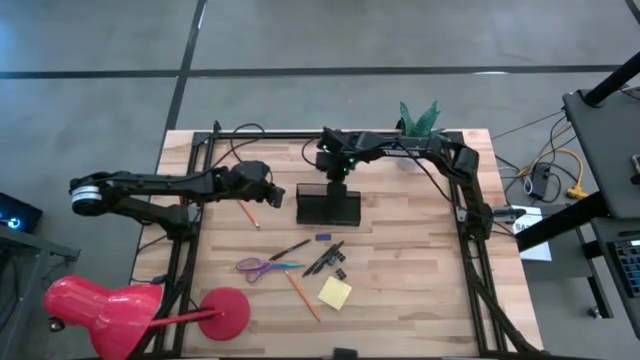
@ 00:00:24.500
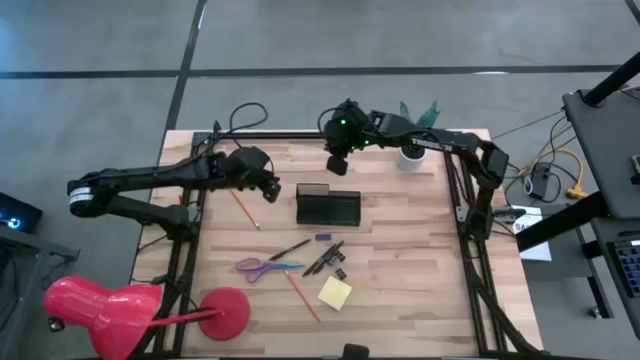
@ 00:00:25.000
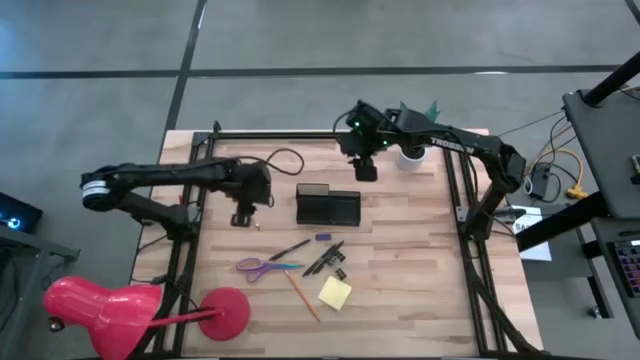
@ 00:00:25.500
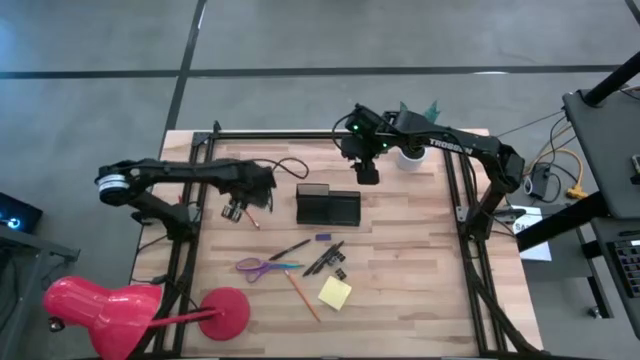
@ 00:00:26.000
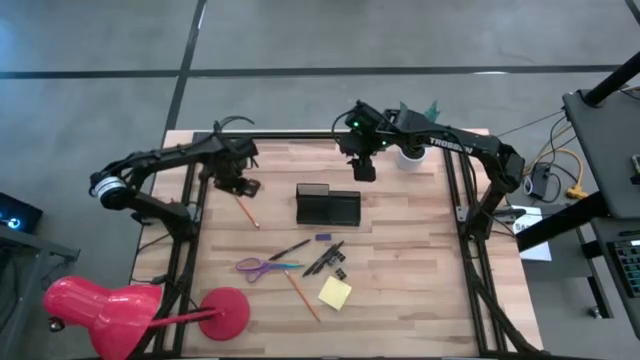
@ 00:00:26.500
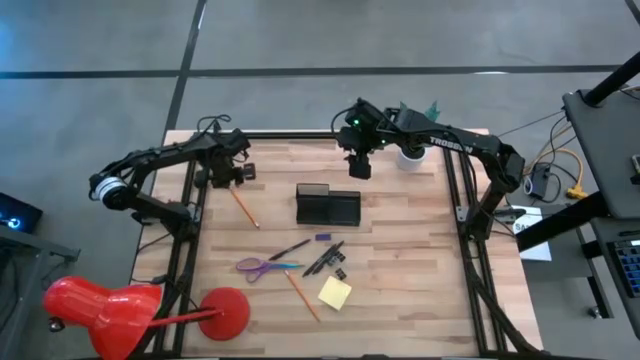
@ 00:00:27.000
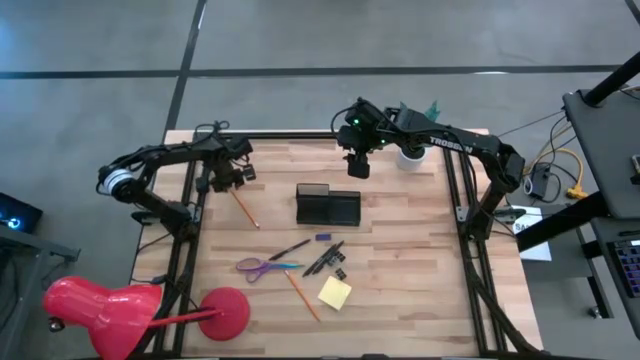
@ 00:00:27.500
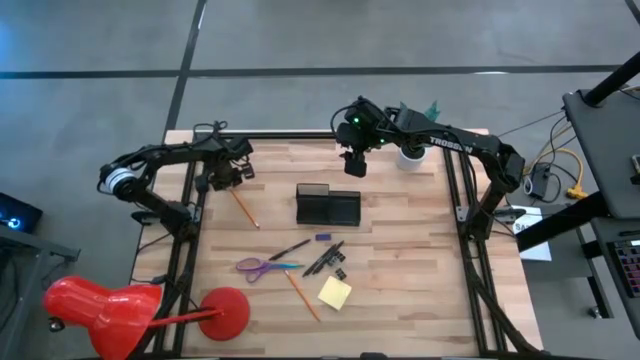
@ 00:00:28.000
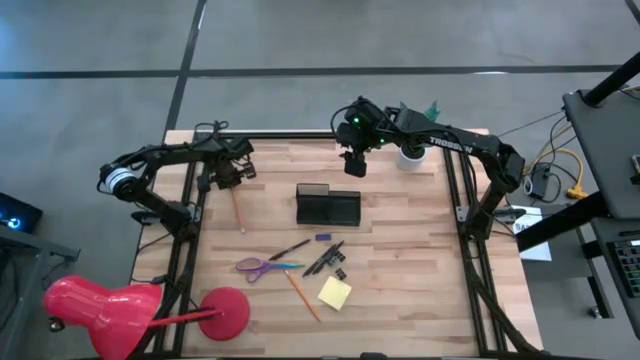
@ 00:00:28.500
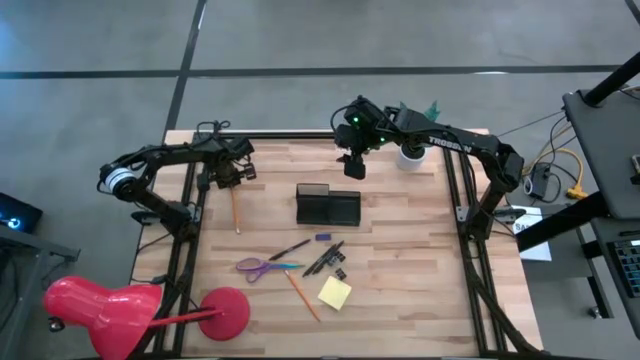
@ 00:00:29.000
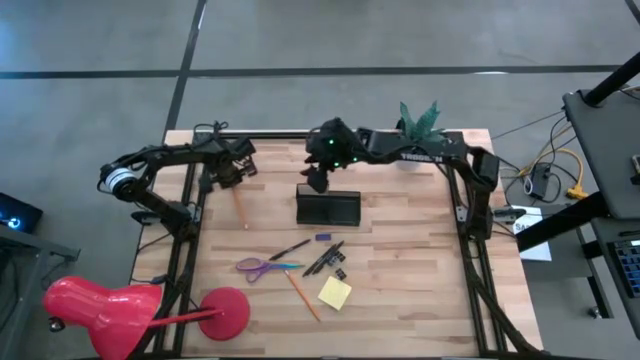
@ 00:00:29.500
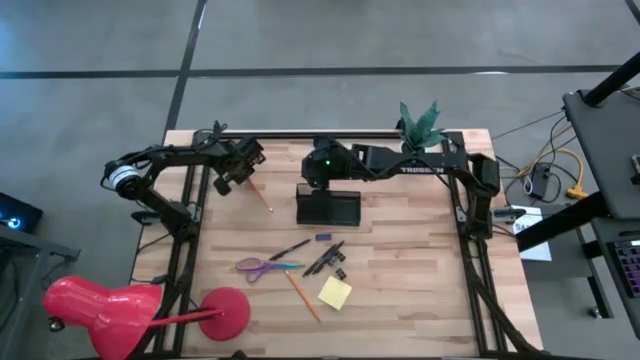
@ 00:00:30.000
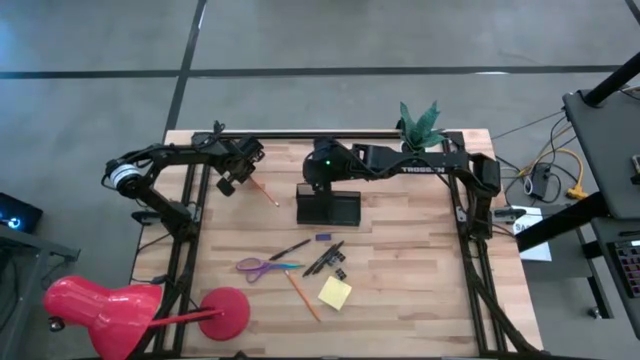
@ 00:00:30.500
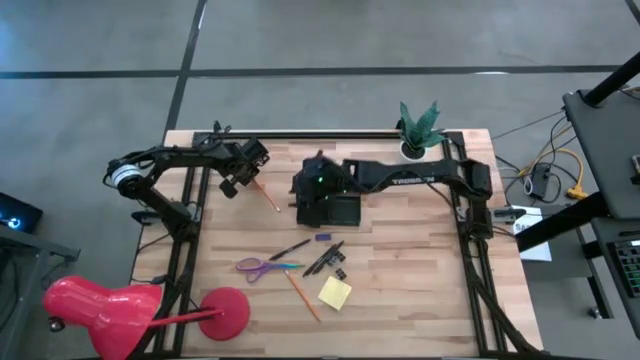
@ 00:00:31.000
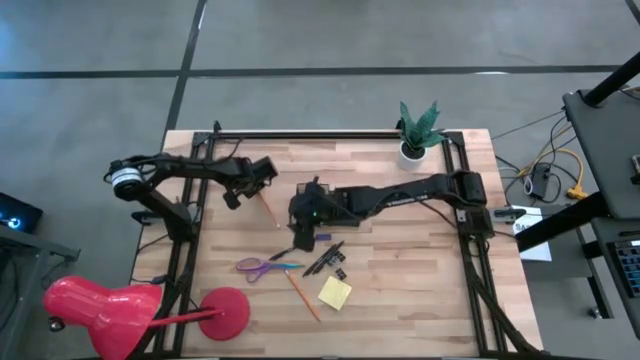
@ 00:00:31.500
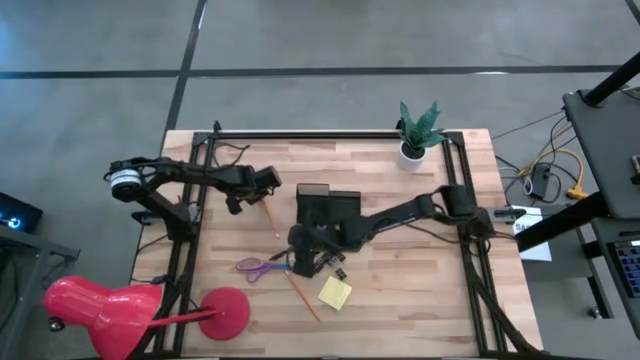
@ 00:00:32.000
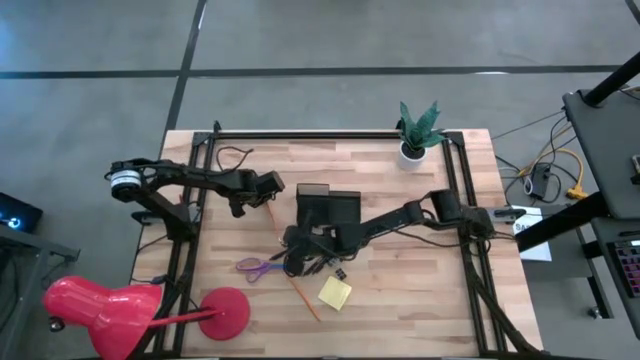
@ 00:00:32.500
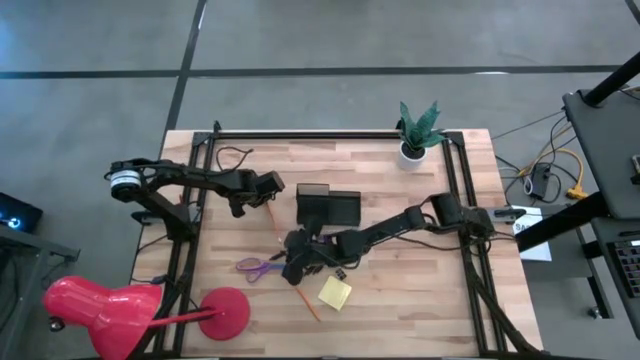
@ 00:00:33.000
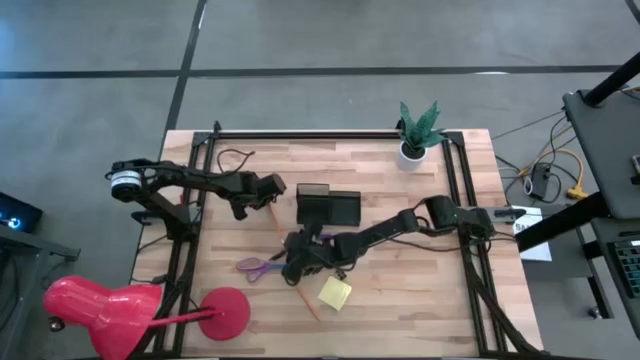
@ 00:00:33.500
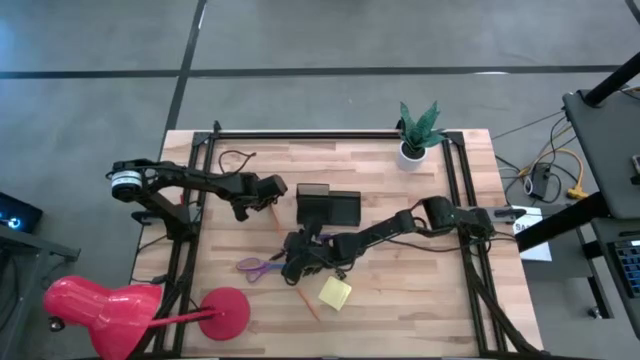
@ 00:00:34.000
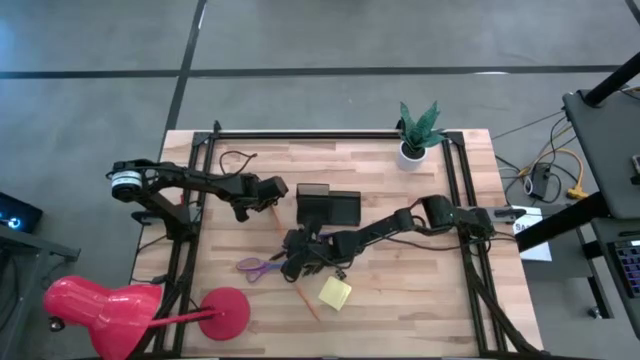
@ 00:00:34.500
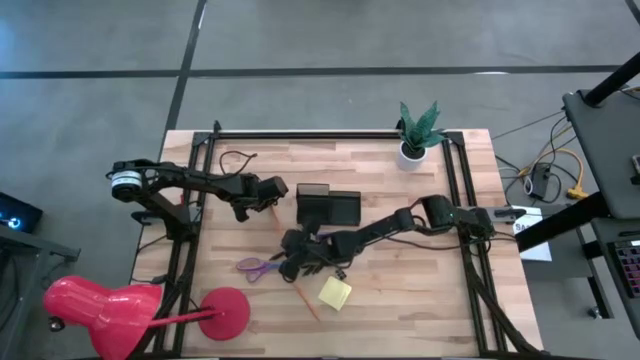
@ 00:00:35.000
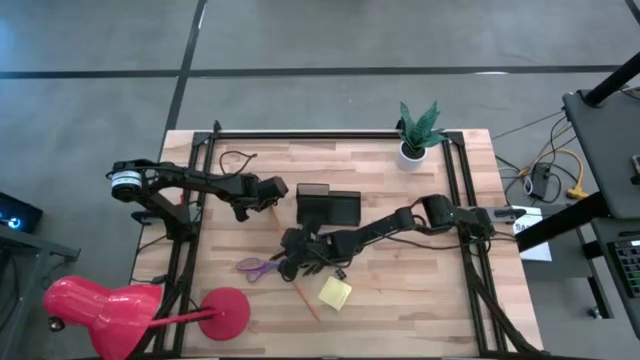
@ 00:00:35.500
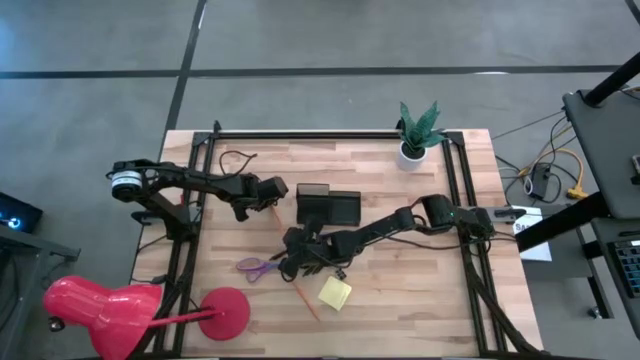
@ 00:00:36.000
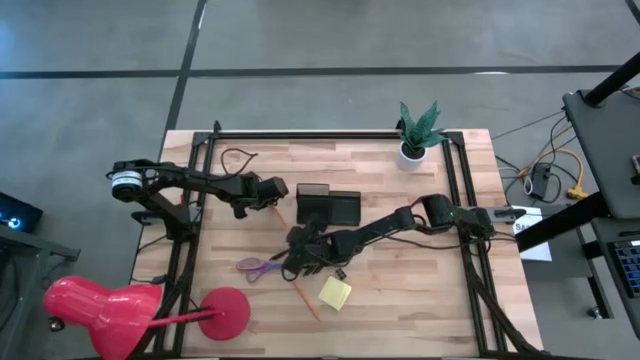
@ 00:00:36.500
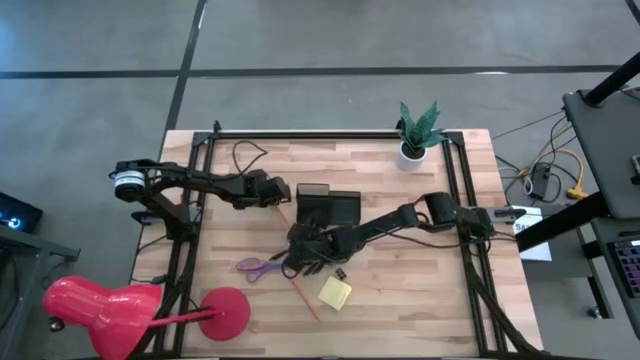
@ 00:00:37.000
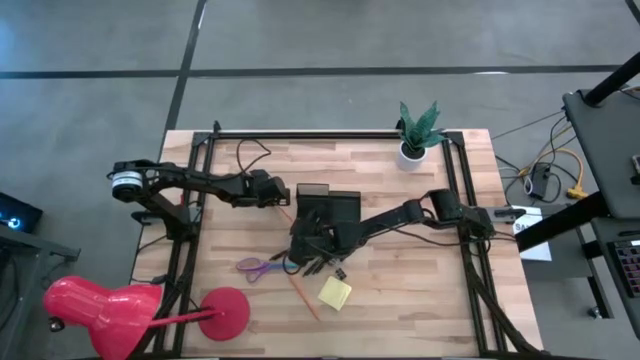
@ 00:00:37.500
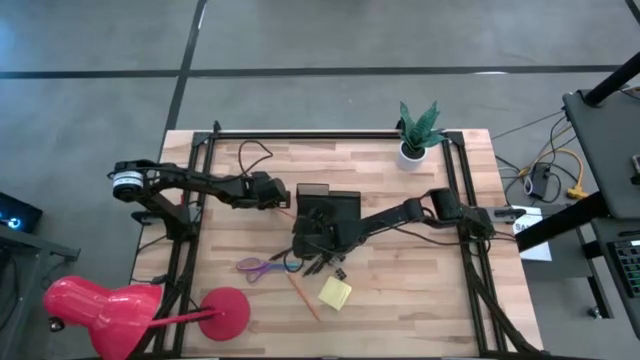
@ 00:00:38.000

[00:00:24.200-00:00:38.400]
Task: Pick and place office supplies into organizer
Put the top pencil into the desk organizer
